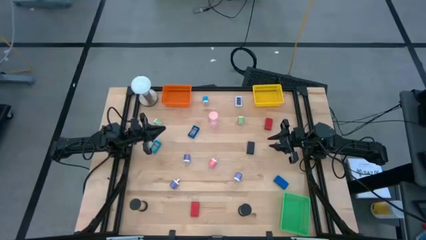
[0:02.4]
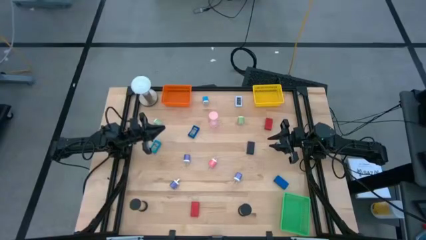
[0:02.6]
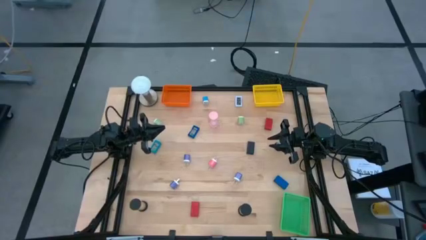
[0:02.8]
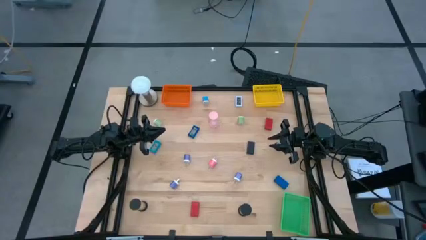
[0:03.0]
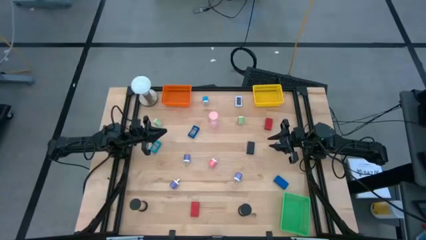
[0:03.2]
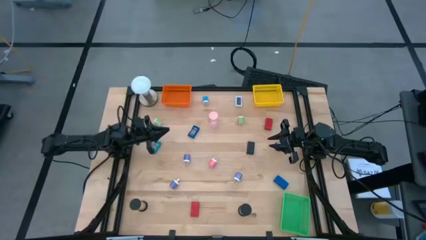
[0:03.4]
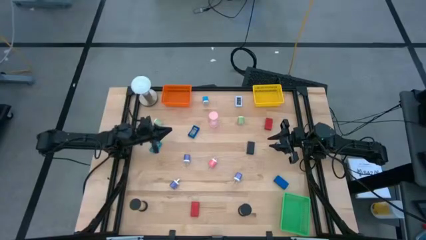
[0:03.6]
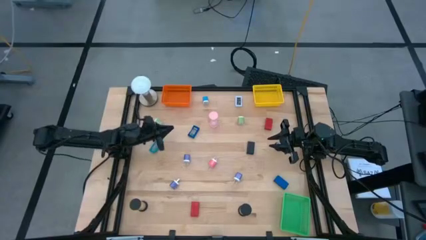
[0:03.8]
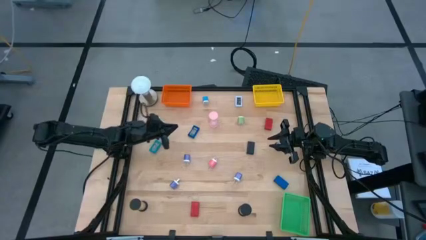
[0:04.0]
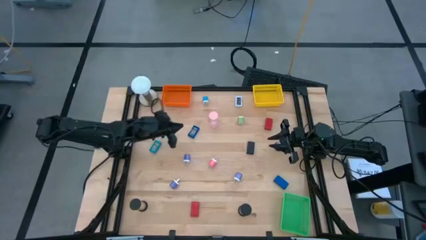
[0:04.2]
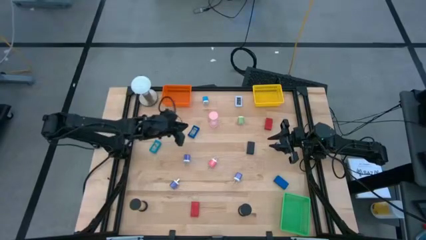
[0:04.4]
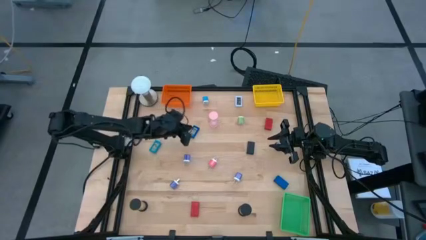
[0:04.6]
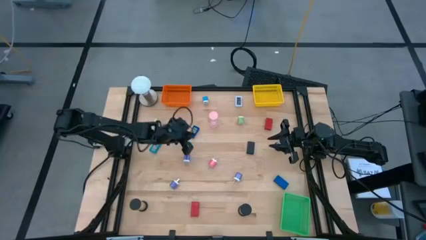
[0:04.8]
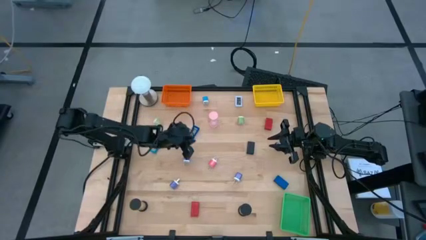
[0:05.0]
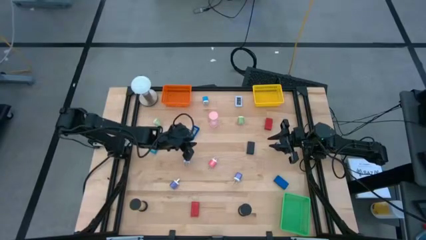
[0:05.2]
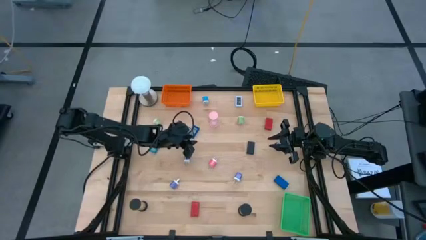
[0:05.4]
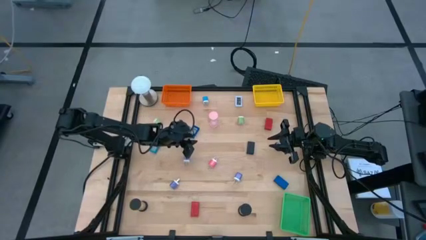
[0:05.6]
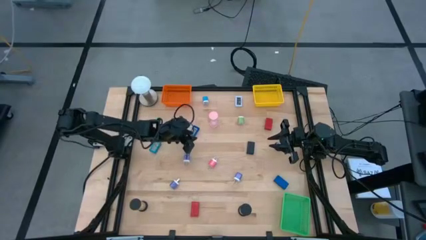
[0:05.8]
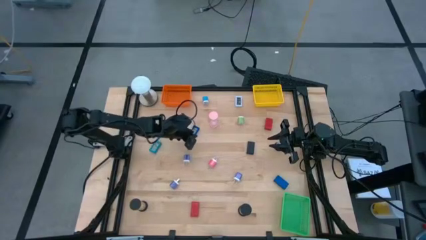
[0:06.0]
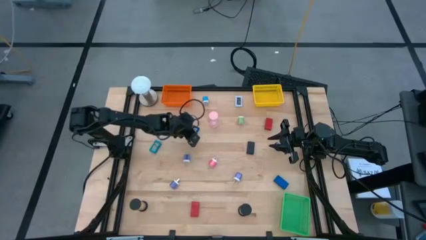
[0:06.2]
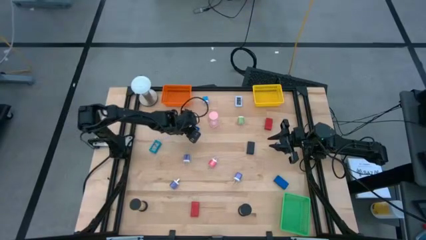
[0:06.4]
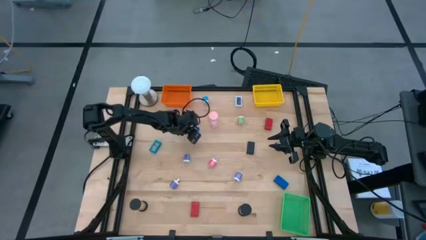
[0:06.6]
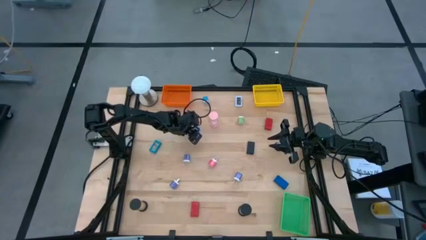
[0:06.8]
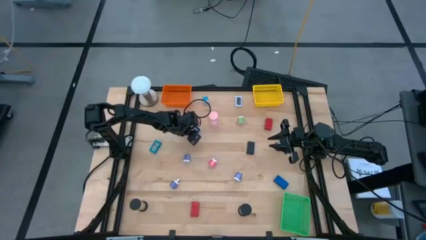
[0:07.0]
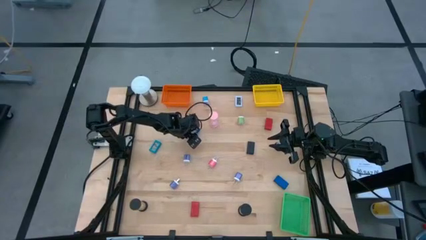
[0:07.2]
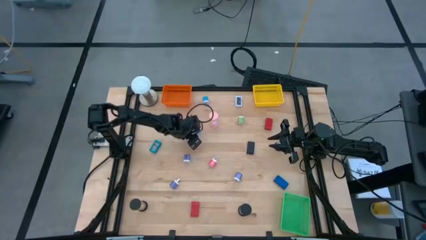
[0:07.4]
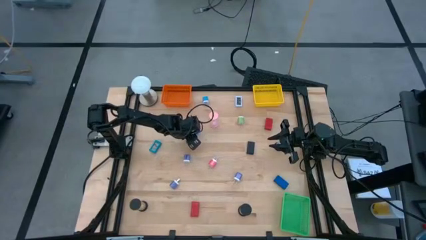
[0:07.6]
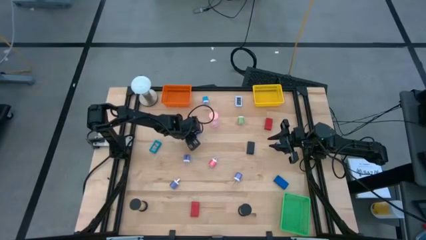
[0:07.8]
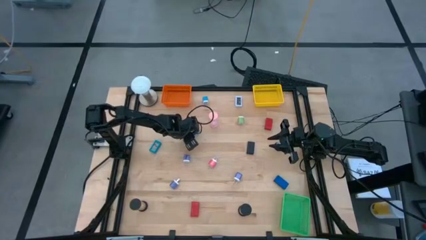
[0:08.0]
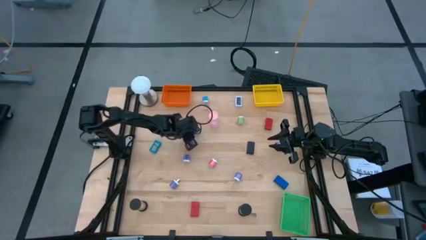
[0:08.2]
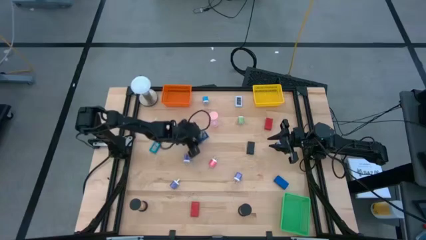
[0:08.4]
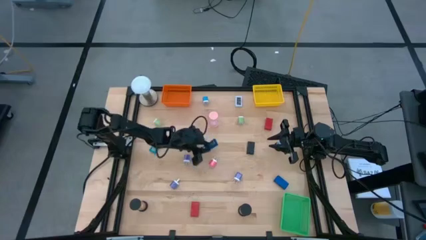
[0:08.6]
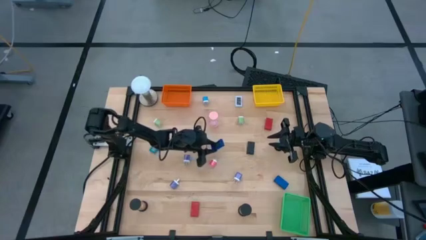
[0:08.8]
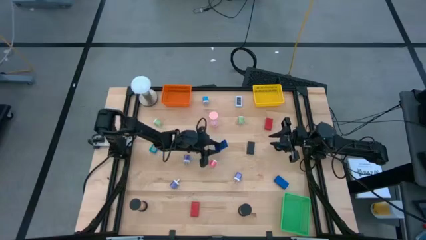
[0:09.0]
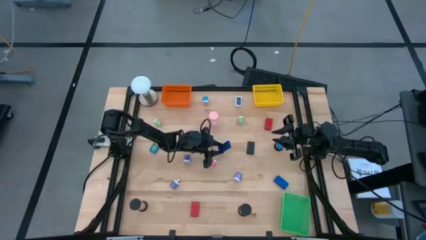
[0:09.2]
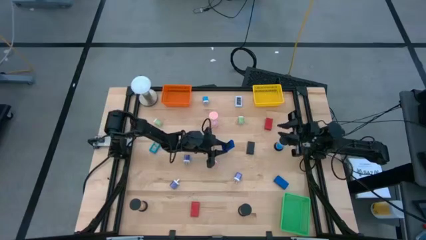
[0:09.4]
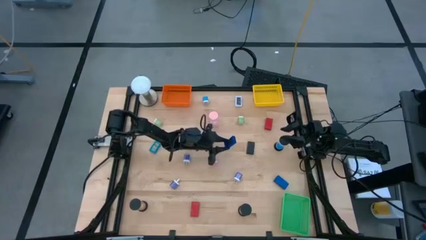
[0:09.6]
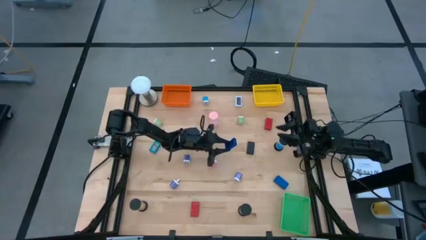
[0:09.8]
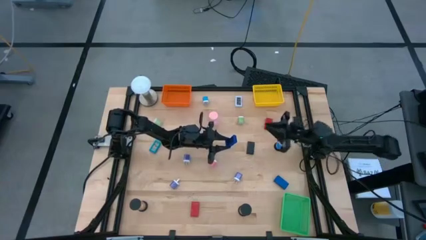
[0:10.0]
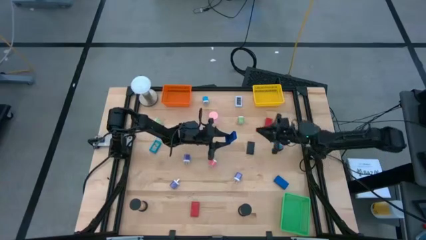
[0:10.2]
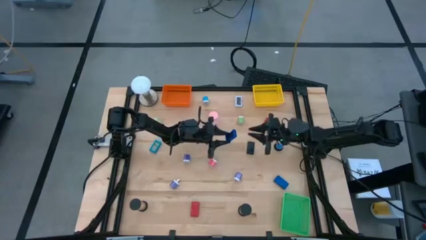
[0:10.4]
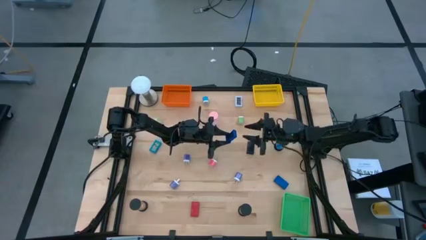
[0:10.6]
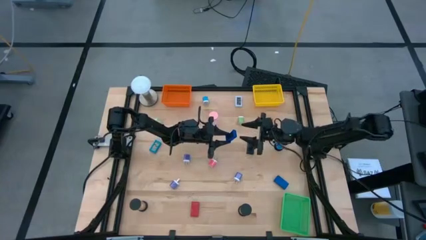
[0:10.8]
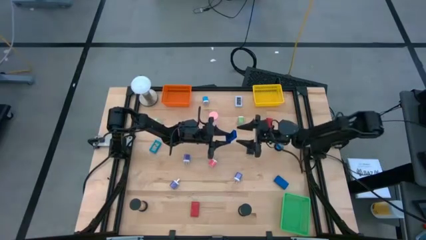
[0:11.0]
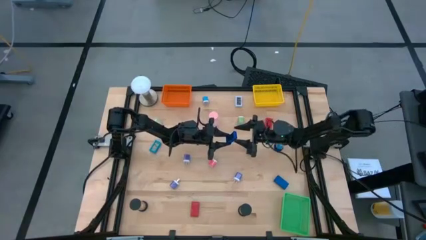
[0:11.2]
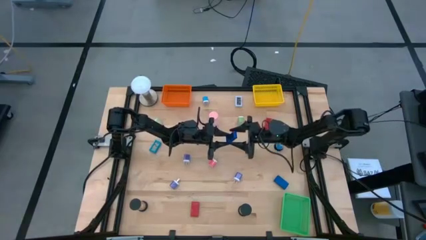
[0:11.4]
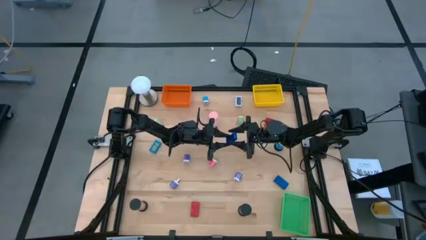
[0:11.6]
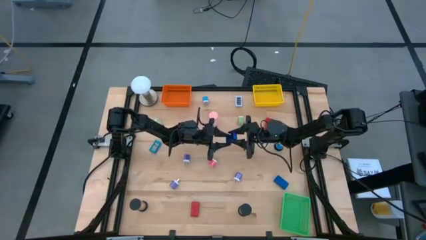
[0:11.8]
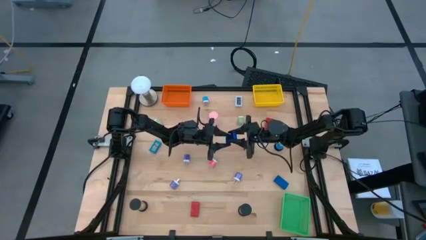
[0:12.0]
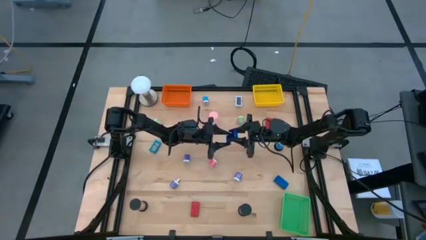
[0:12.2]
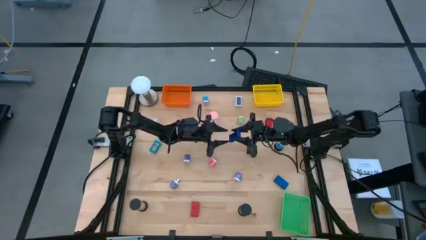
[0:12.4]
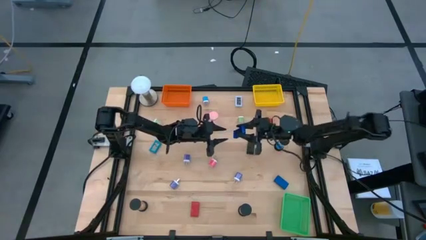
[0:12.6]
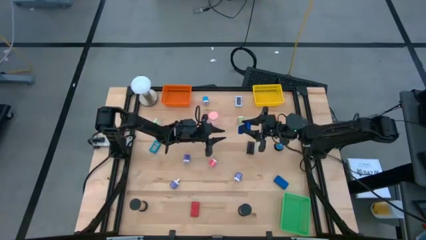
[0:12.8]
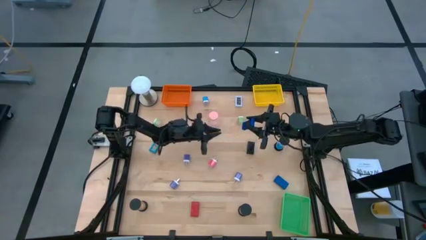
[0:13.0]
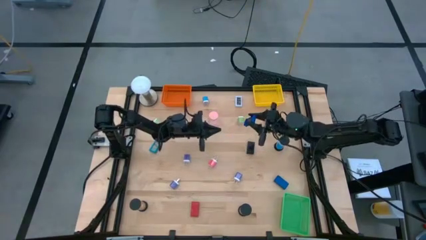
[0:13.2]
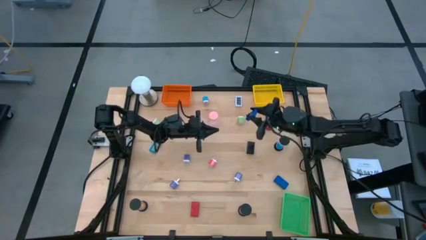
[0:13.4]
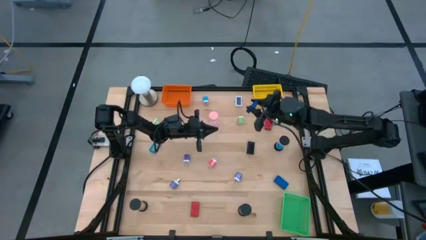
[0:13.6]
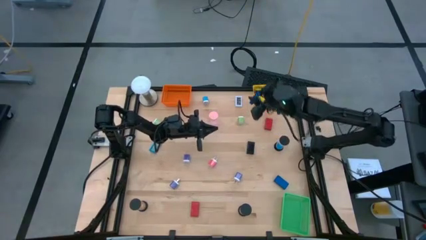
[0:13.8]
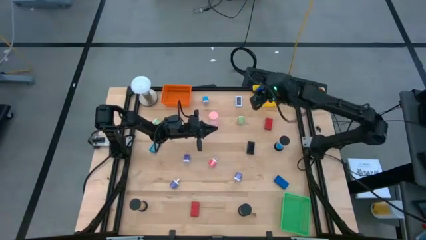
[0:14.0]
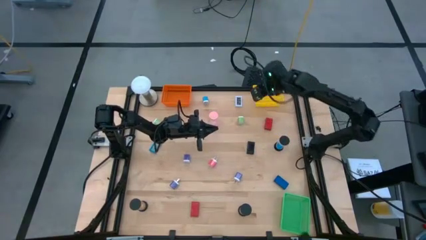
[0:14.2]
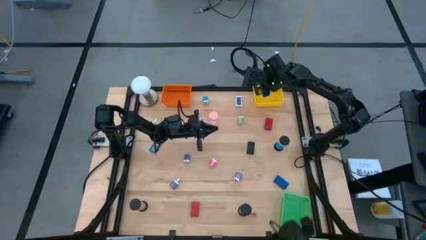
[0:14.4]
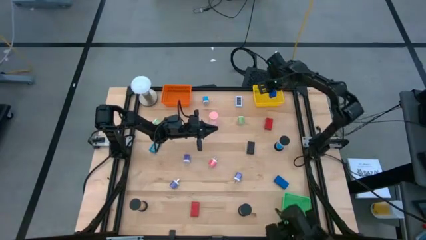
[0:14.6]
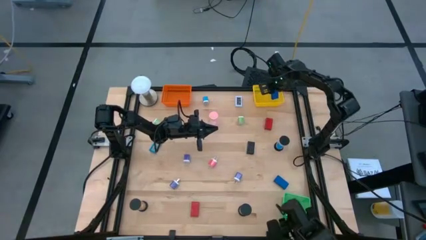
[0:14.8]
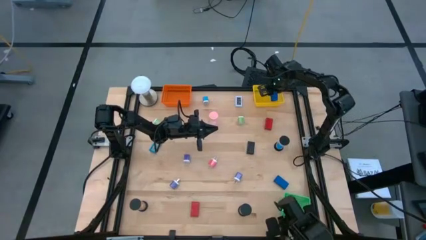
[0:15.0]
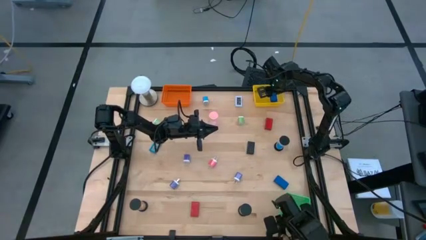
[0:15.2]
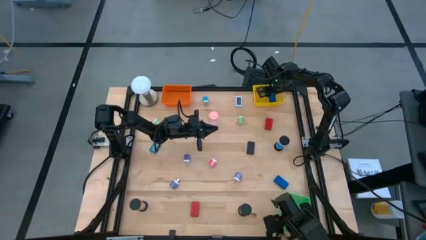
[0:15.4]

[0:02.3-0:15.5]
Task: Pick & Place Office items
Put the top blue timer into the yellow basket
